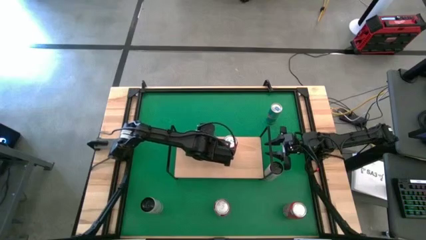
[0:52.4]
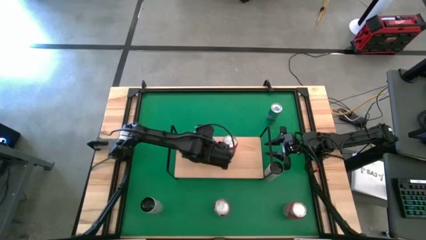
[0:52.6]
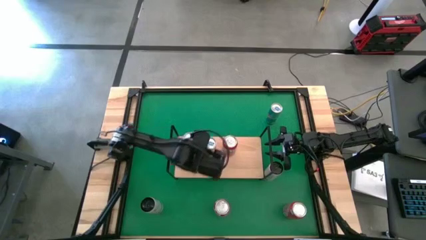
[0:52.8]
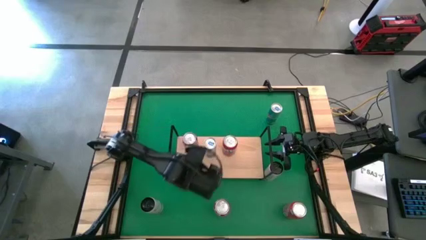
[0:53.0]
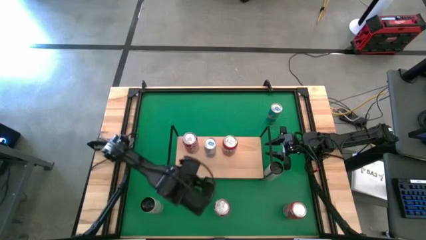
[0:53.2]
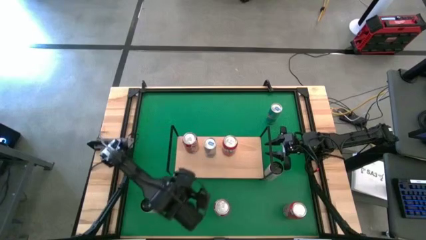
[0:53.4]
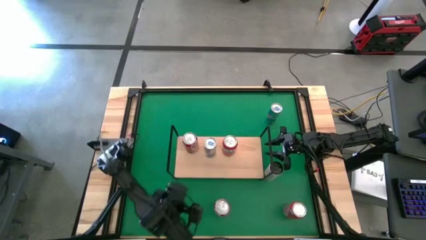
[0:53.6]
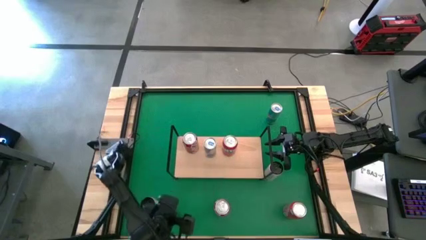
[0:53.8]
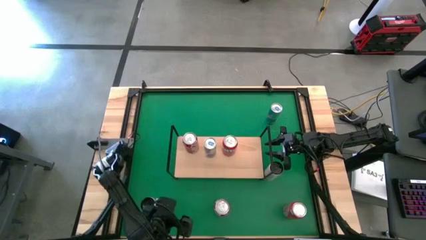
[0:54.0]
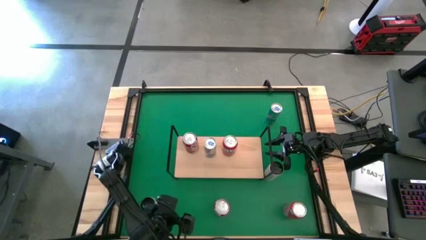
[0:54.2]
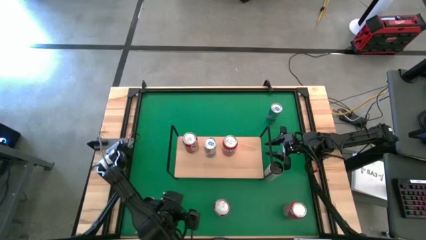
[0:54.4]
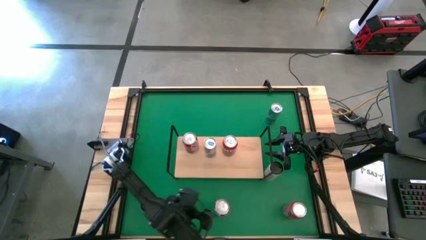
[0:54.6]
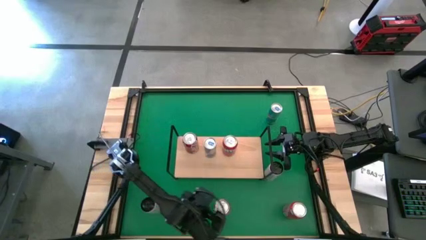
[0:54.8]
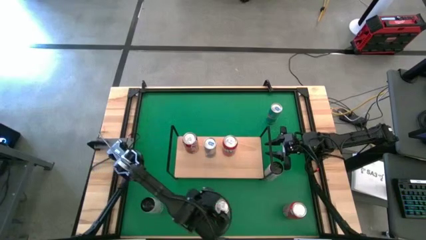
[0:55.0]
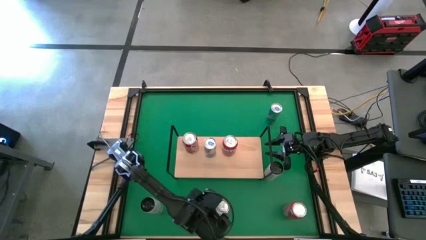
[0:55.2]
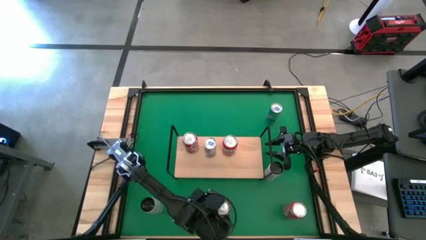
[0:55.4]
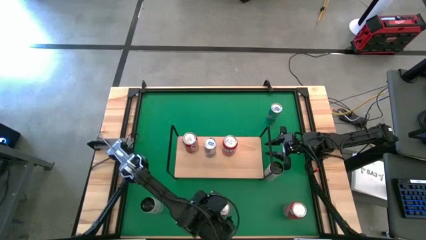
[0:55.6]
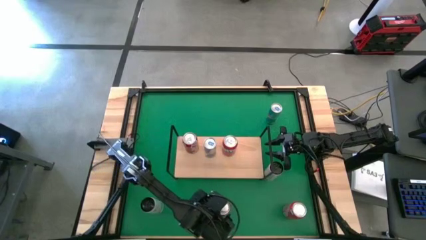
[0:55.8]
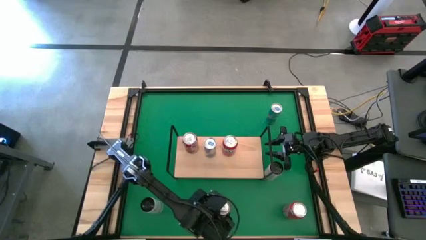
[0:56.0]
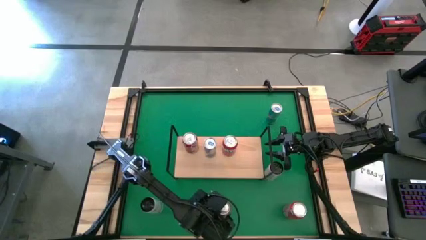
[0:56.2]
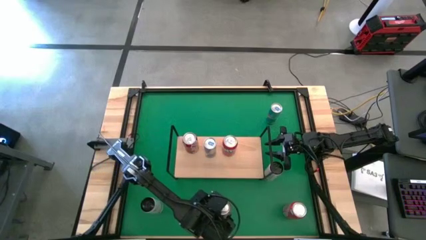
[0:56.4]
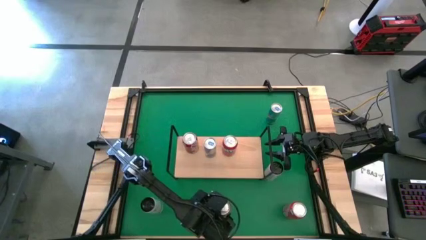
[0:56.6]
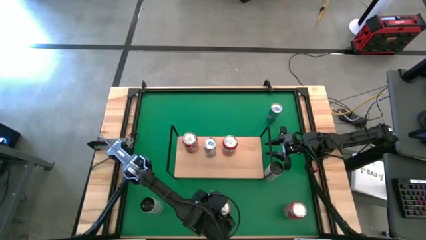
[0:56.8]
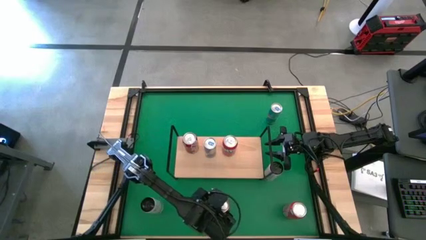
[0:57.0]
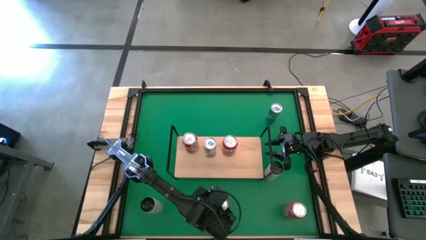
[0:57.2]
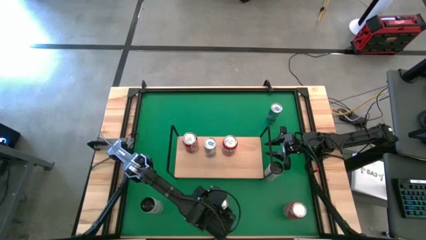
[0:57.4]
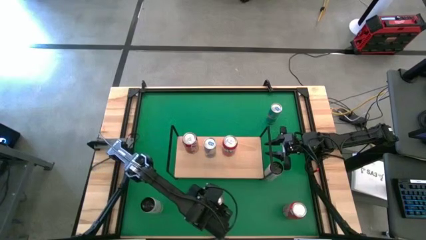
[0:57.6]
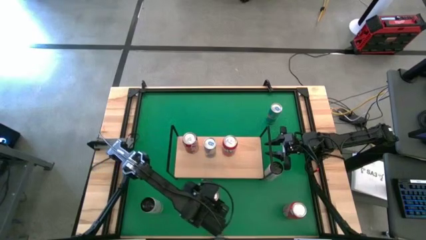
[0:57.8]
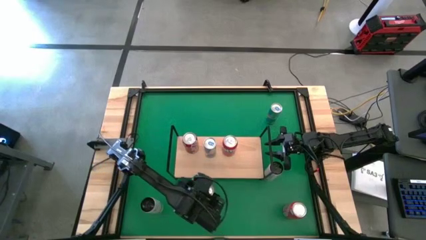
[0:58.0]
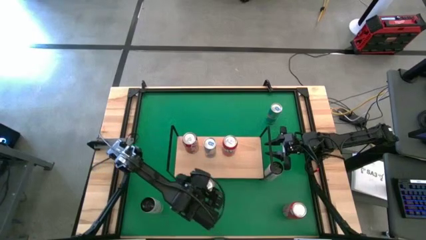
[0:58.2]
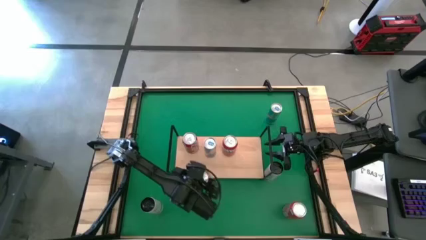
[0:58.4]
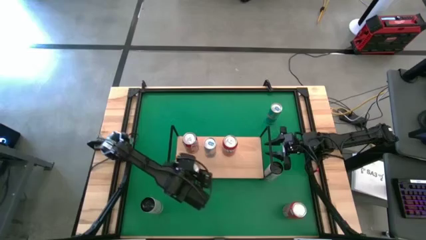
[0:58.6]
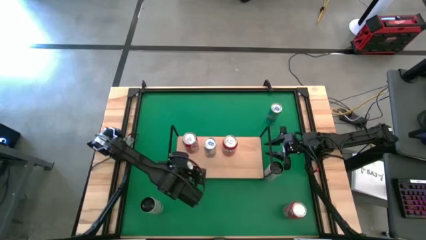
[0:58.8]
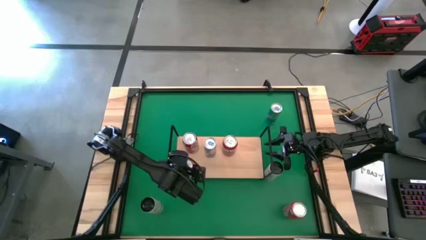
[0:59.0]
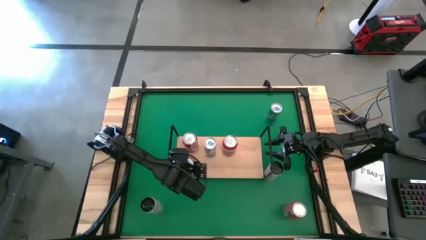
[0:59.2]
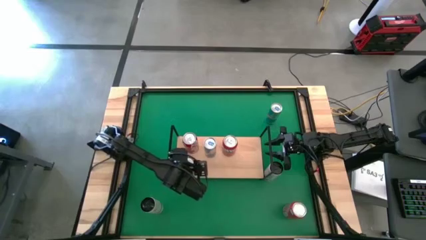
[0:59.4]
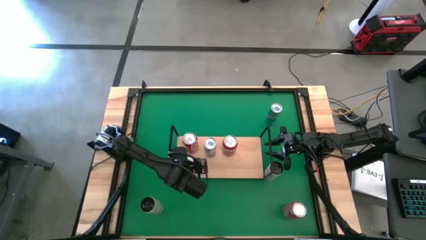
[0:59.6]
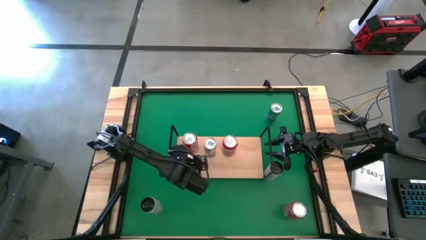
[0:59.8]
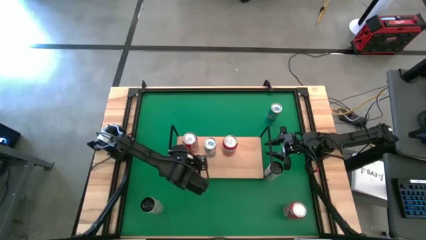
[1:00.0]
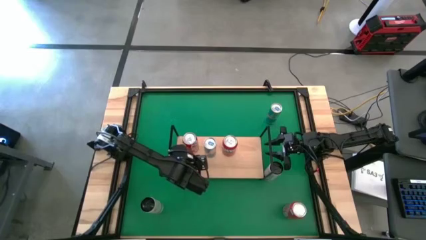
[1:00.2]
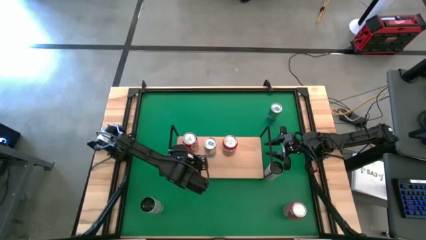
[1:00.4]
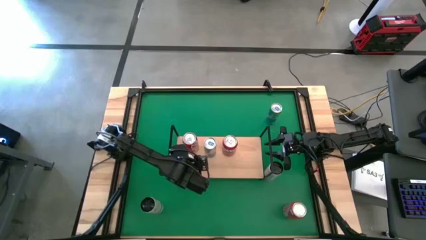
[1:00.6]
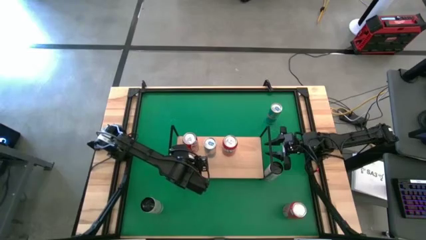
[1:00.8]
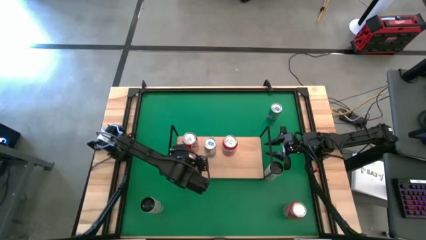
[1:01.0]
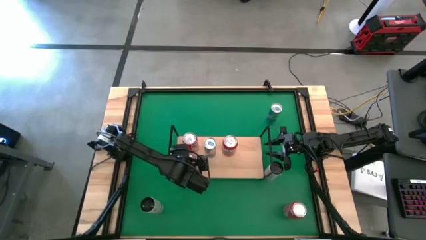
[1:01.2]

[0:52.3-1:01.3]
Task: Place canned beverage on shelf
Put the red soda can on the shelf

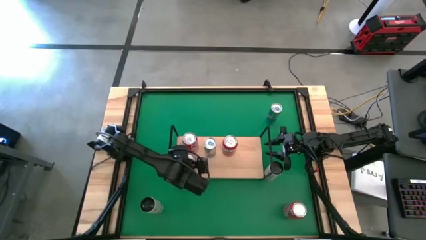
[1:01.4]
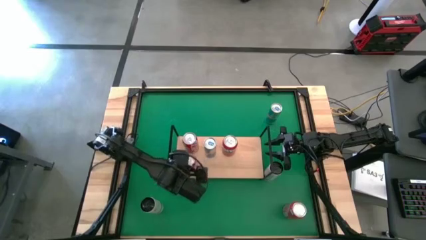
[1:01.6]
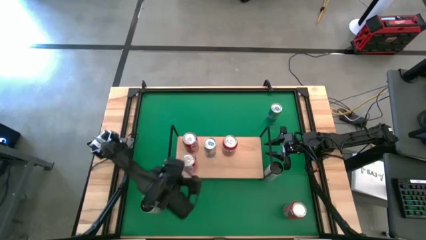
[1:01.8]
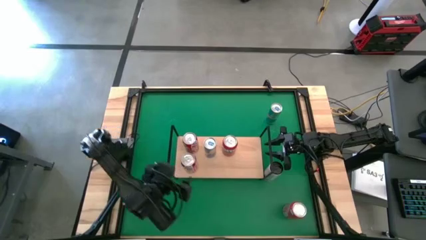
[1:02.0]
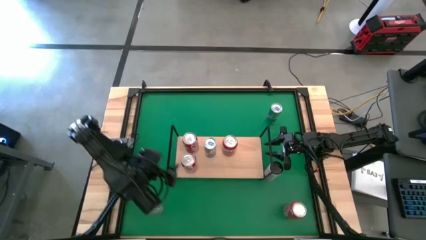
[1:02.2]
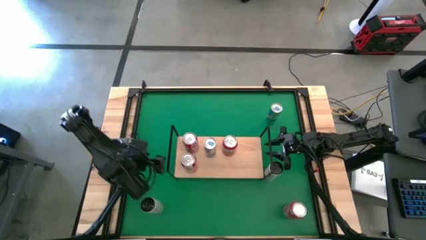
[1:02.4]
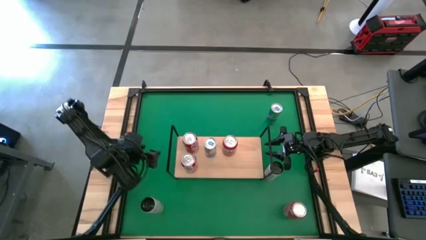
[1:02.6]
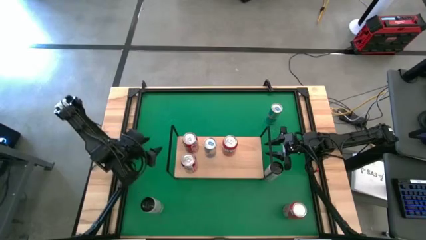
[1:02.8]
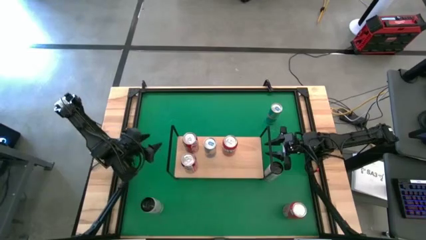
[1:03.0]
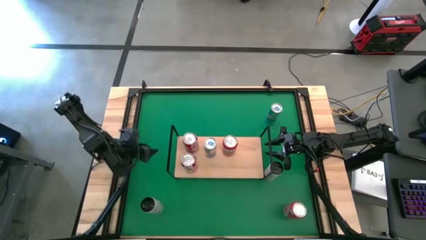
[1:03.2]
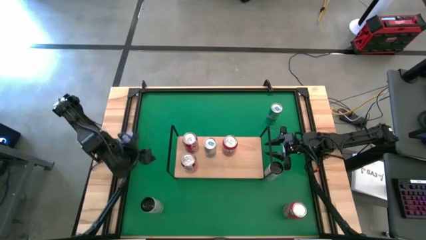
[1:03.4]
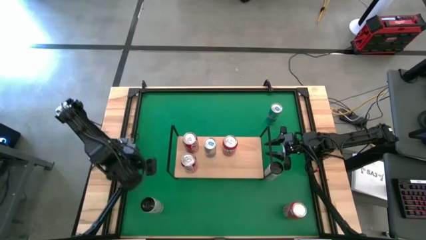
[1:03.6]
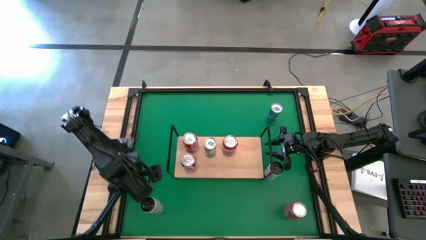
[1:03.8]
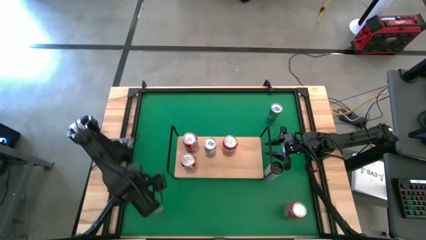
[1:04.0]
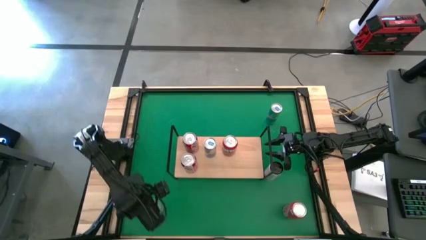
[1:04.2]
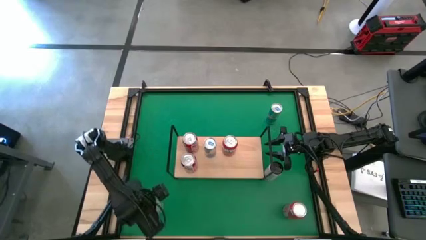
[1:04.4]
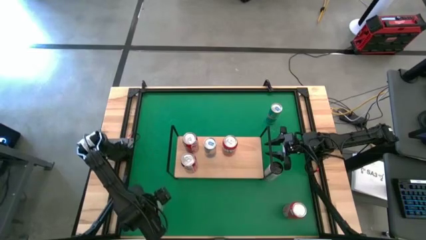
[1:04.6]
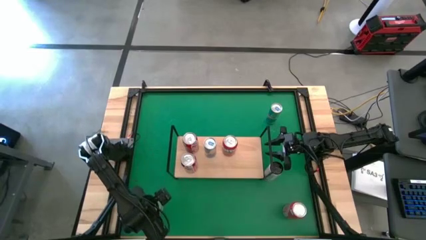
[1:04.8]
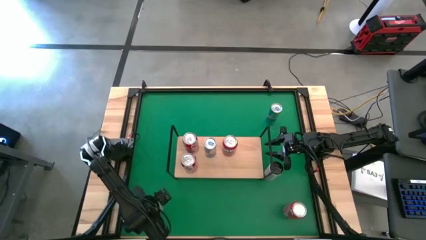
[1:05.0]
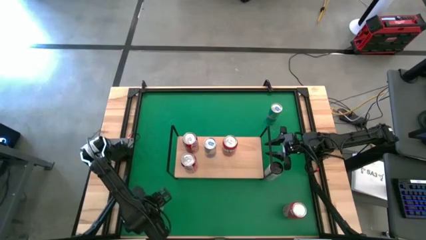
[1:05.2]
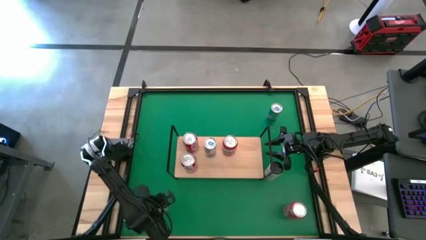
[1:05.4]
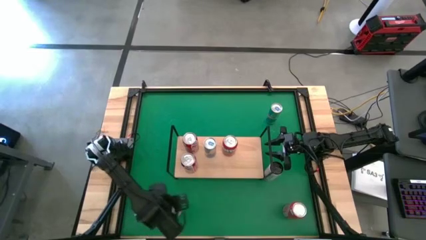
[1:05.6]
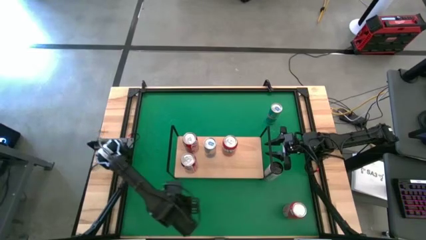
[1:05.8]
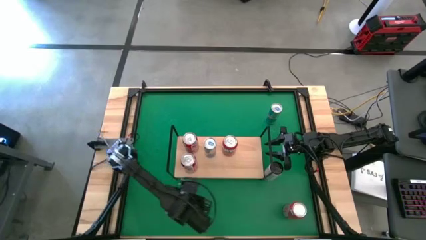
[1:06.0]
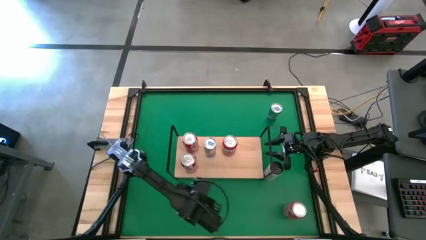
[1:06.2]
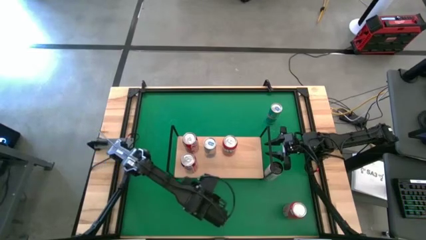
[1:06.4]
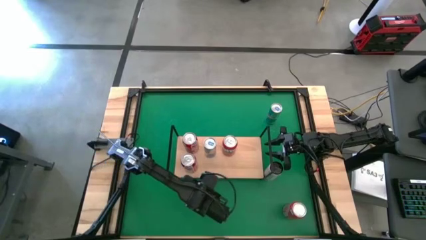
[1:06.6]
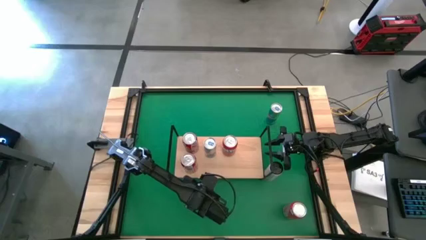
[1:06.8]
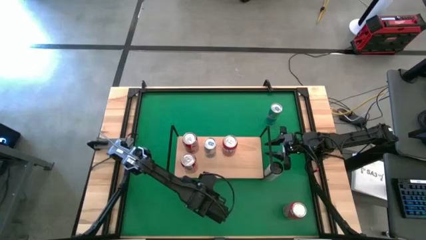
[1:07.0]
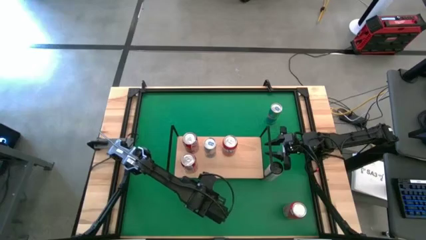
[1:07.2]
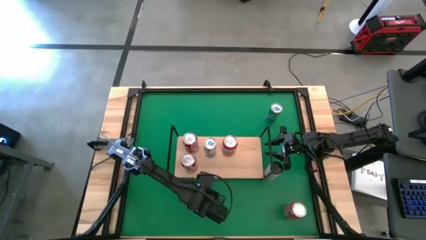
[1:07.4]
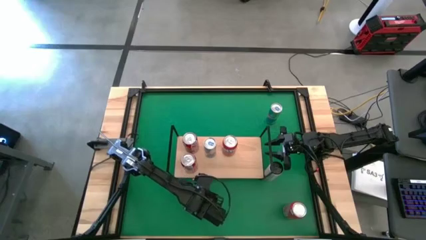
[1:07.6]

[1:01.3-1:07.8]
Move the white soda can to the center of the table

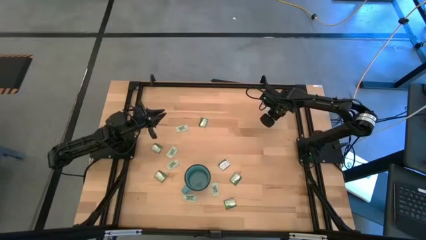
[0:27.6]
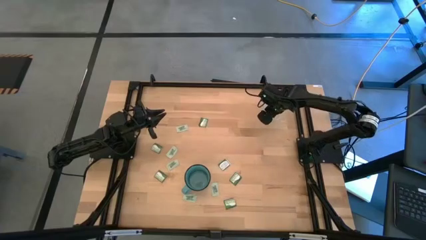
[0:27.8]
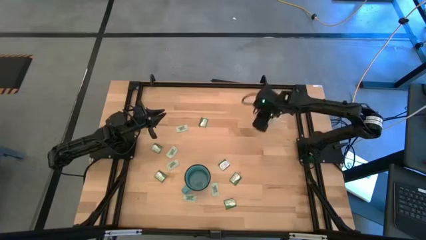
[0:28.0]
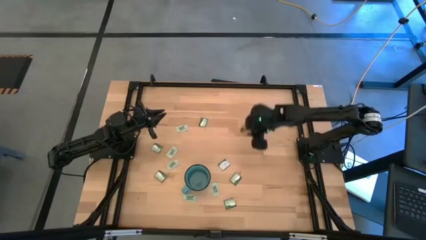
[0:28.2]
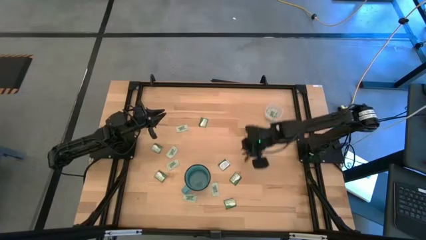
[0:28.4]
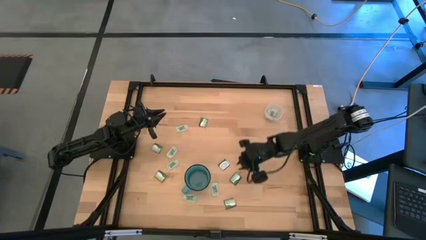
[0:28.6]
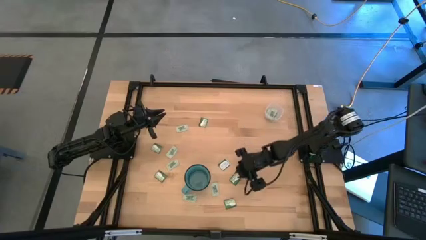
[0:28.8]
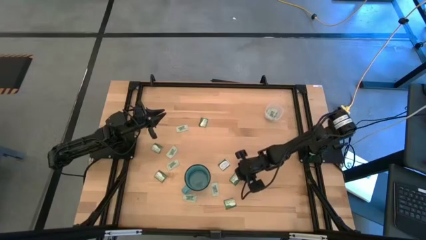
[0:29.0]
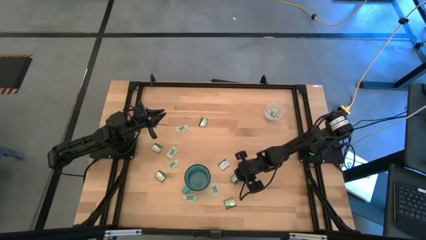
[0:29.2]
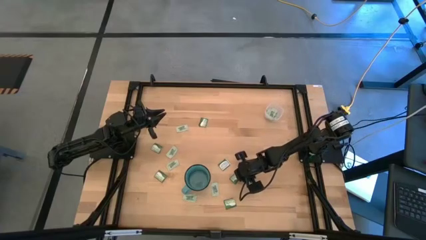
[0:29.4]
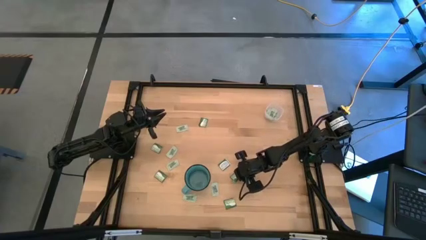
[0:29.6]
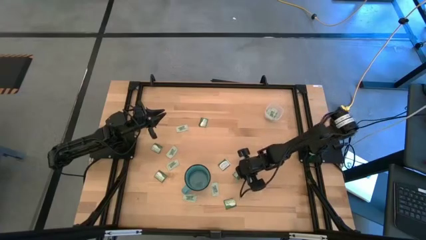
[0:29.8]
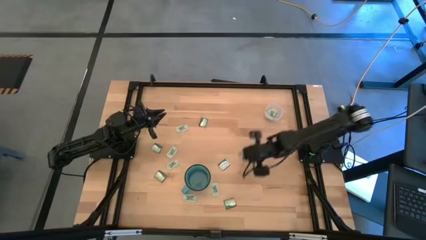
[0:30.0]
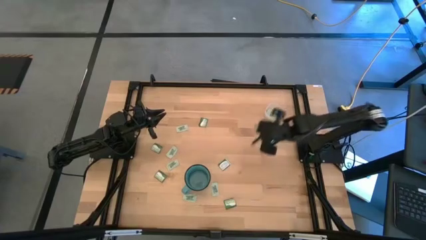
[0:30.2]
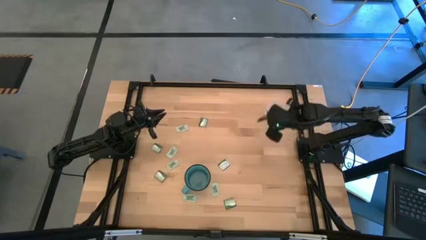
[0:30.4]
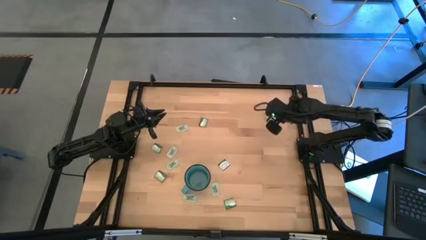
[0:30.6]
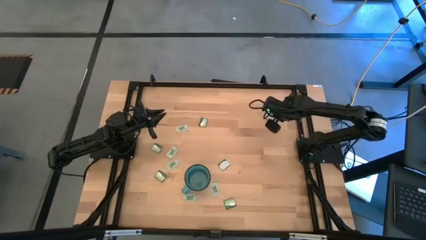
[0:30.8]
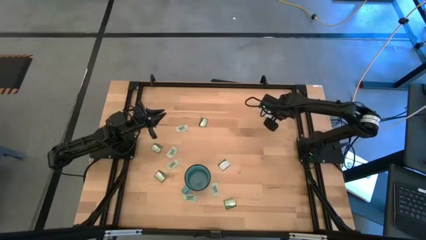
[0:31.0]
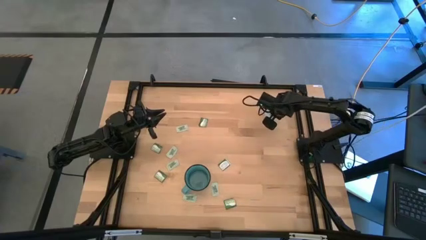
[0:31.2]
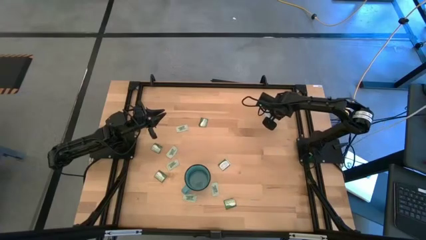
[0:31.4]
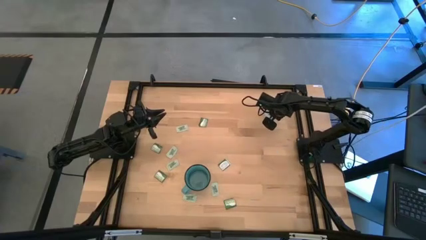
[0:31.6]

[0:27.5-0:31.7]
Task: Pick and place items into bin
Put the truvia packet into the transparent bin
